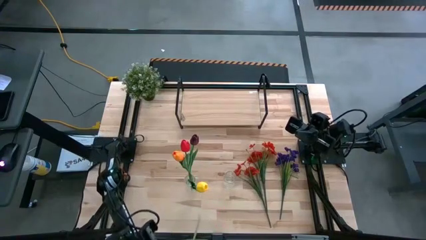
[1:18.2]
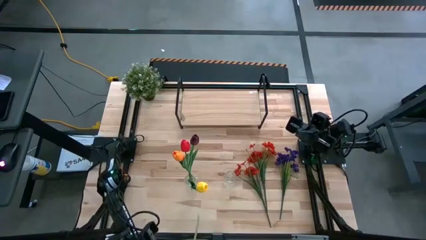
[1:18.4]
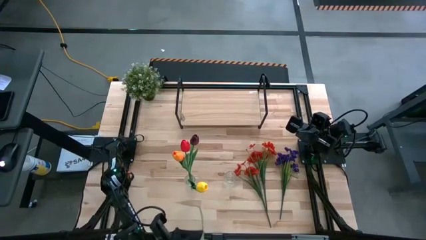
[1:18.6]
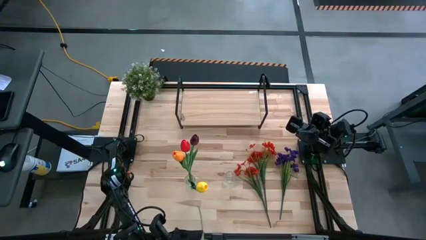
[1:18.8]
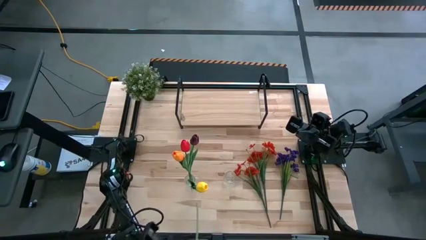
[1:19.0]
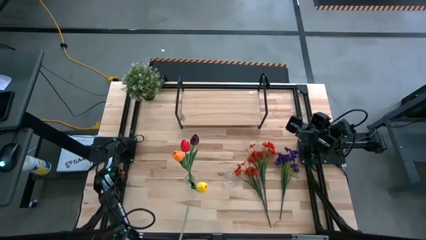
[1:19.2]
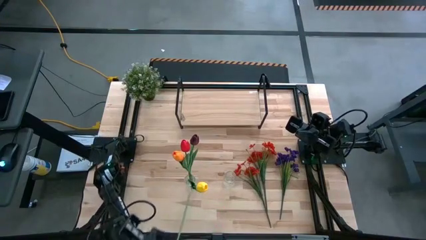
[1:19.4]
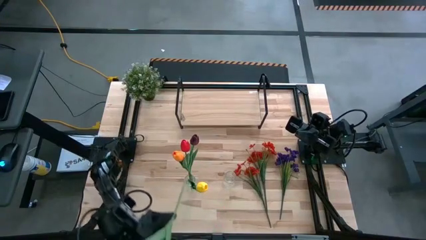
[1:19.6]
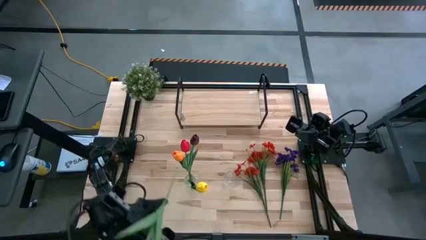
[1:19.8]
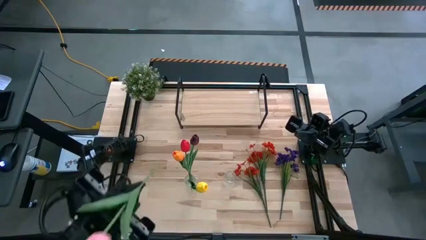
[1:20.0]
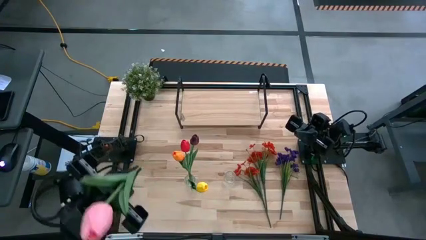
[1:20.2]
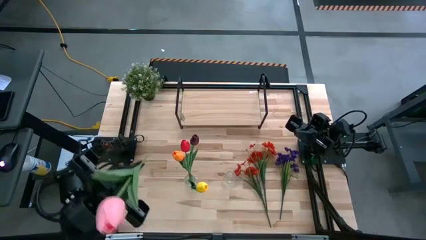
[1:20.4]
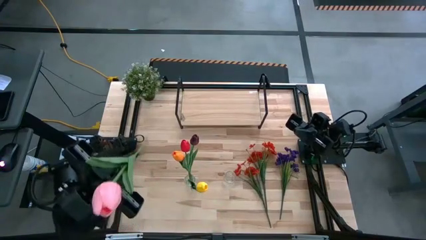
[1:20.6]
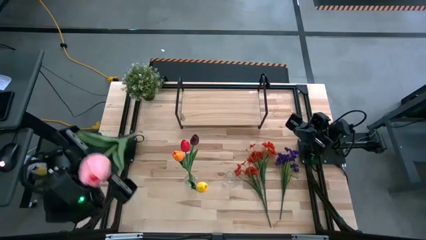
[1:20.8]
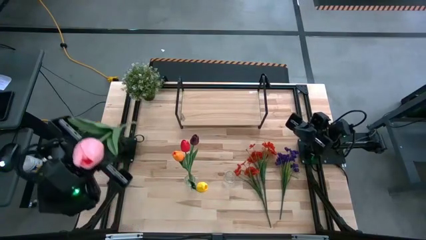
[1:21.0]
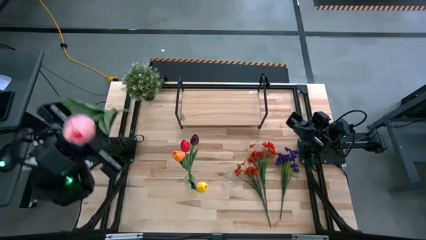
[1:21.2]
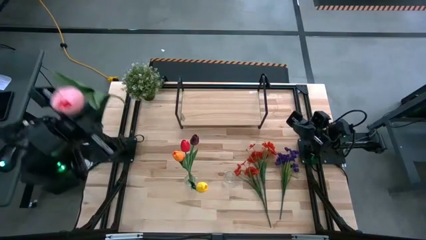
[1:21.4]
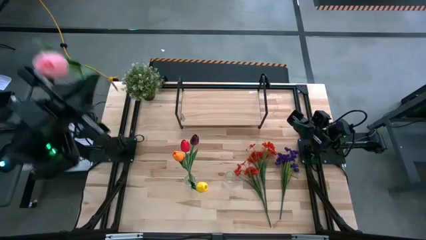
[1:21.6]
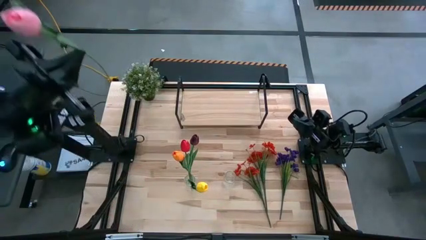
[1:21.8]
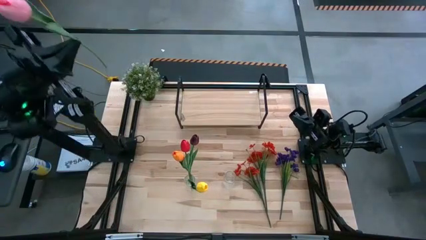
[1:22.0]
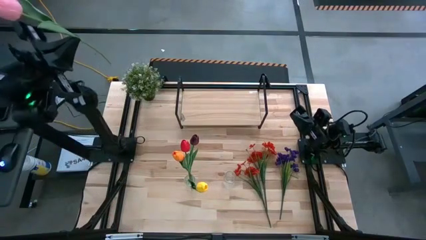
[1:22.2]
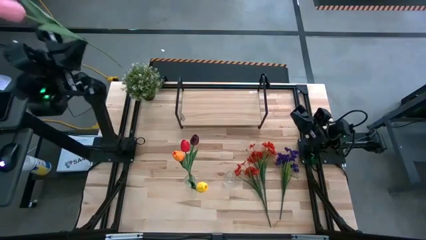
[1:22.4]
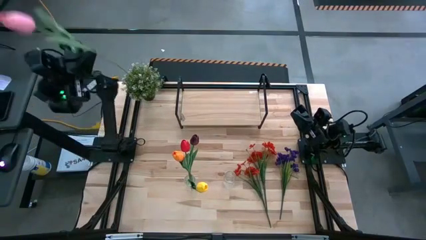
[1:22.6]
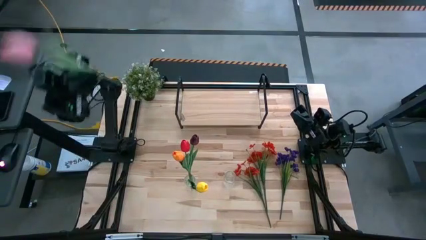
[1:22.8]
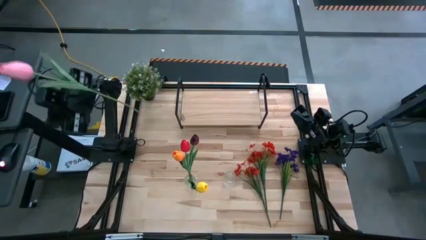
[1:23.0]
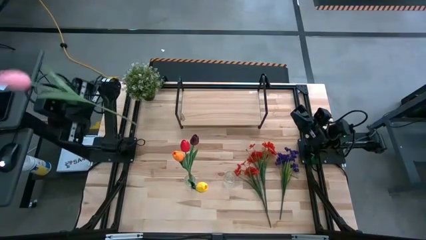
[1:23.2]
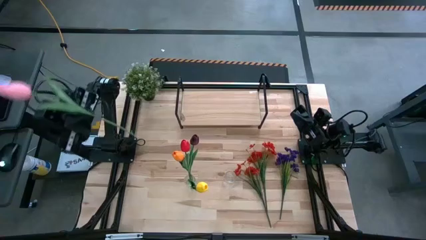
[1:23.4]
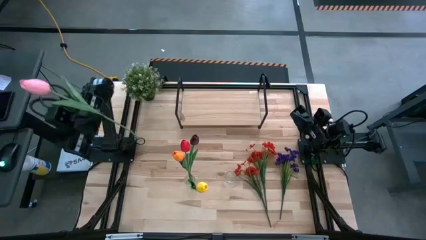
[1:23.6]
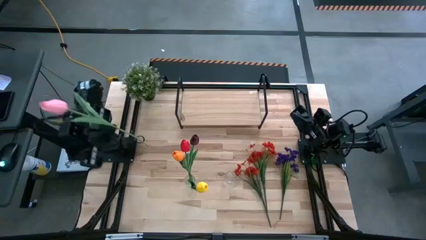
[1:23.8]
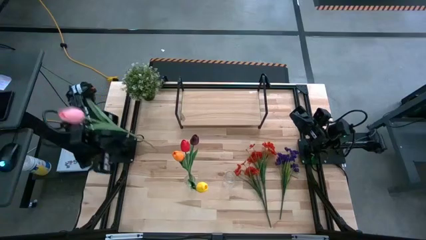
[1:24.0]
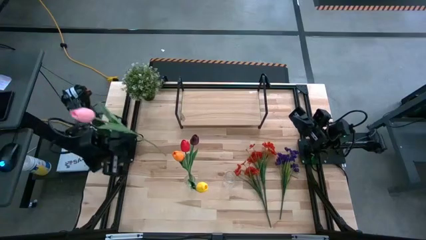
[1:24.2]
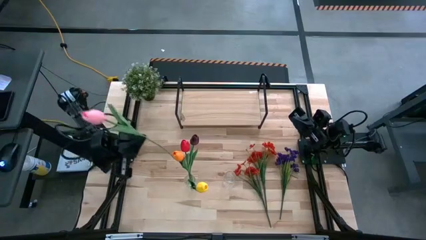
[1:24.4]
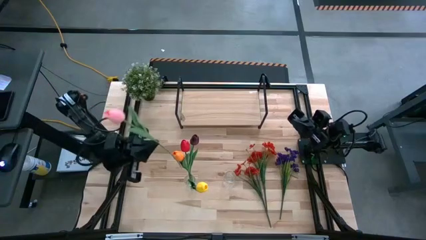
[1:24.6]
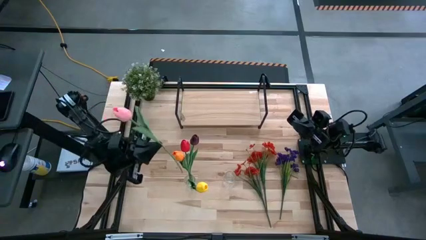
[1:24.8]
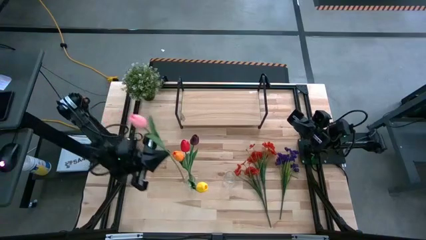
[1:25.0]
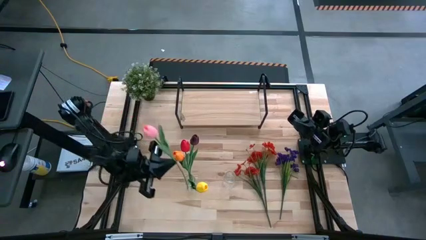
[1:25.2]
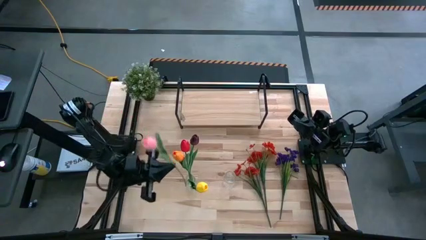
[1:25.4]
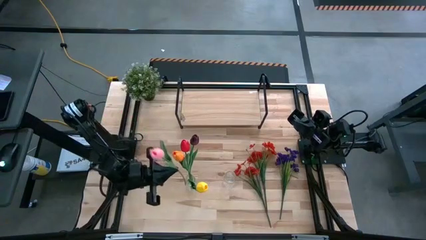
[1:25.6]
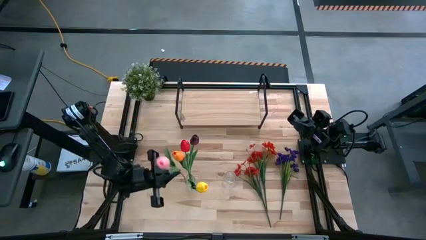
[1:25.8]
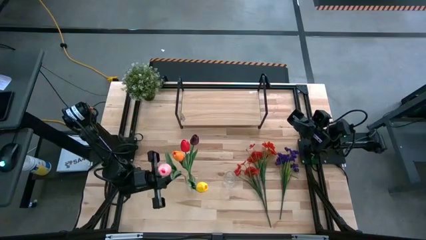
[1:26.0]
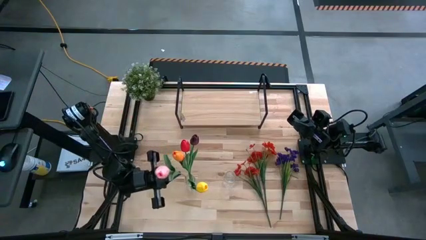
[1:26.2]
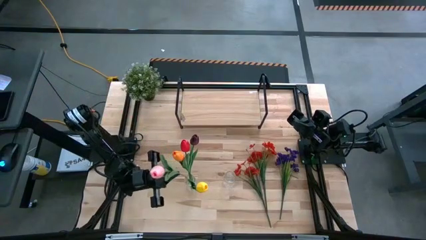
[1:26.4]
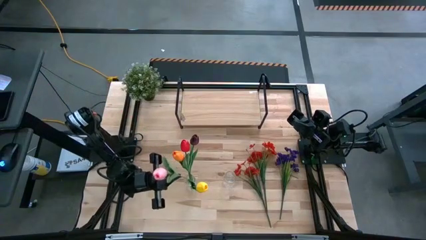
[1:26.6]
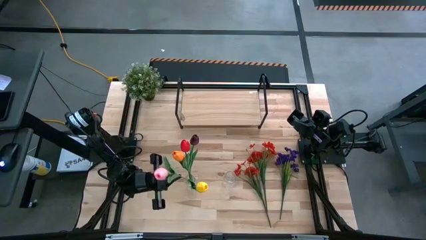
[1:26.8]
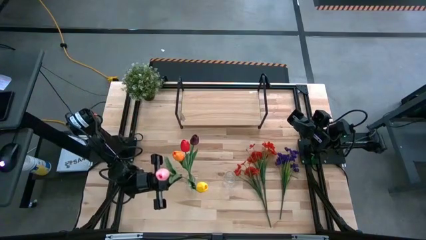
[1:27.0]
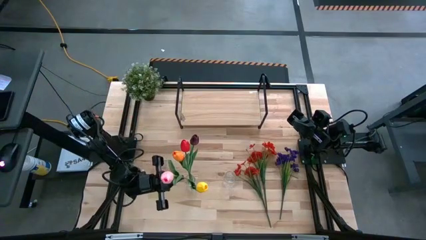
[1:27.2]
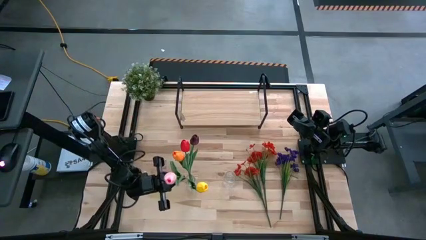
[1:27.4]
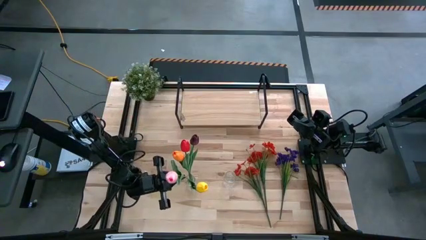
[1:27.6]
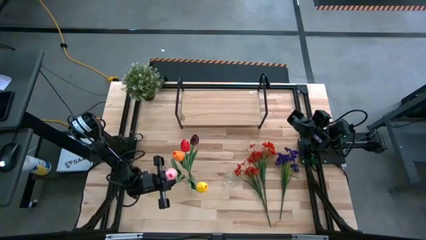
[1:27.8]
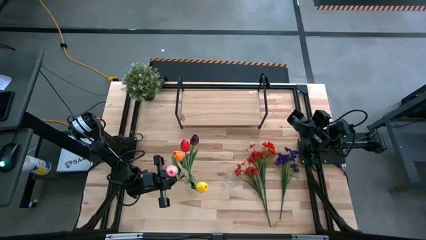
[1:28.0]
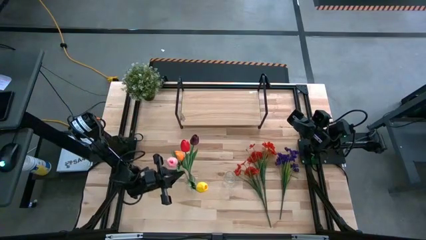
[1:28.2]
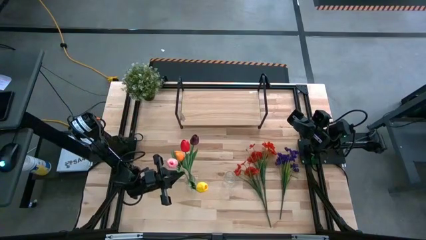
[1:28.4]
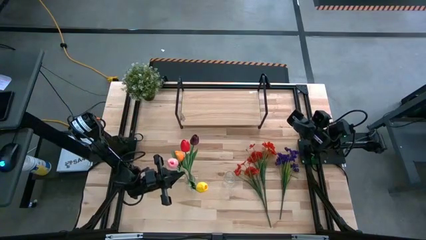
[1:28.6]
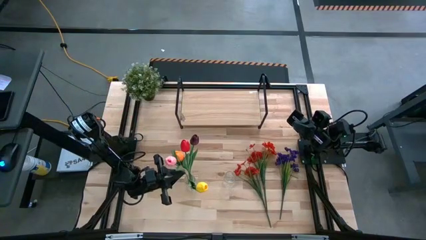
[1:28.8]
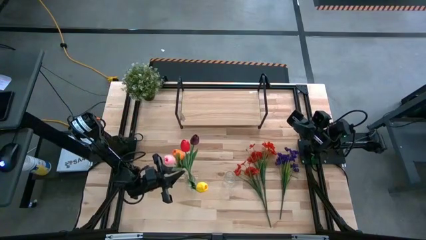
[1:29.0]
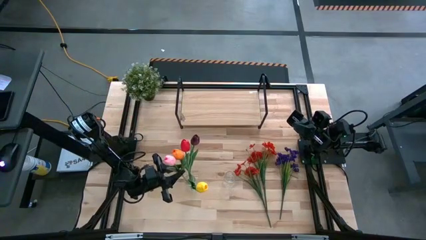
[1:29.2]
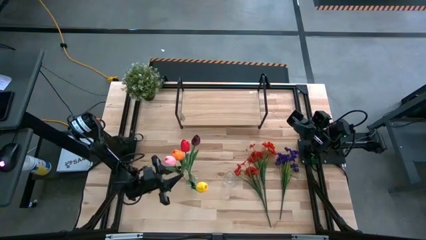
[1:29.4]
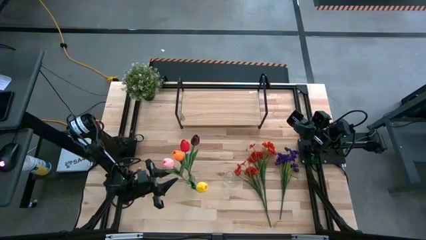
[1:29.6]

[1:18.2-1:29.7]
Task: Pick and place flowers into a vace then onto a shelf
Put the pink flower into the left transparent vase
